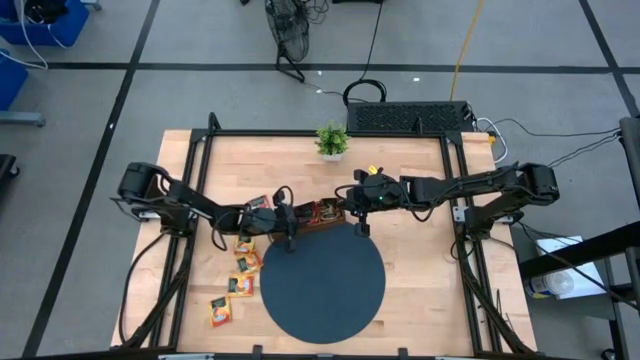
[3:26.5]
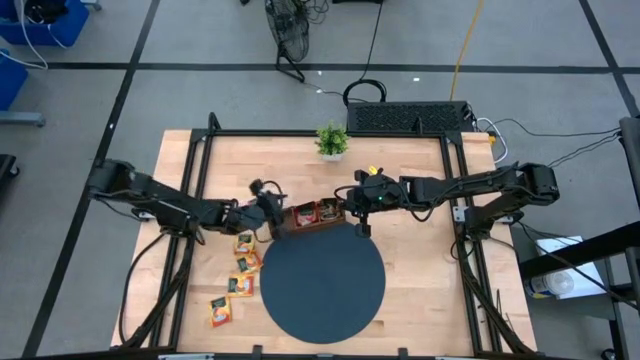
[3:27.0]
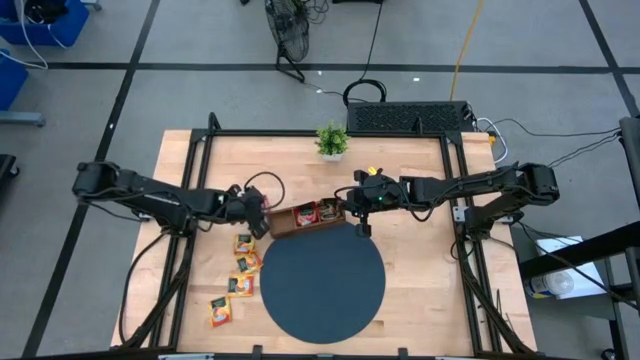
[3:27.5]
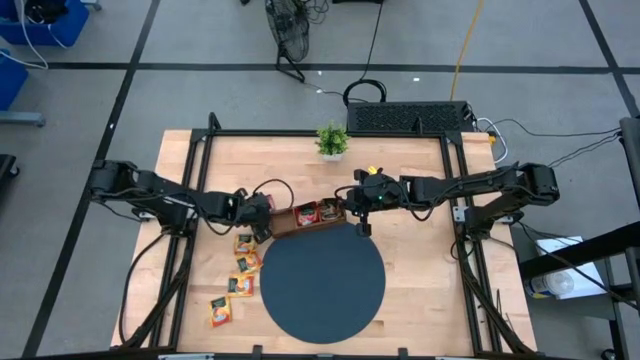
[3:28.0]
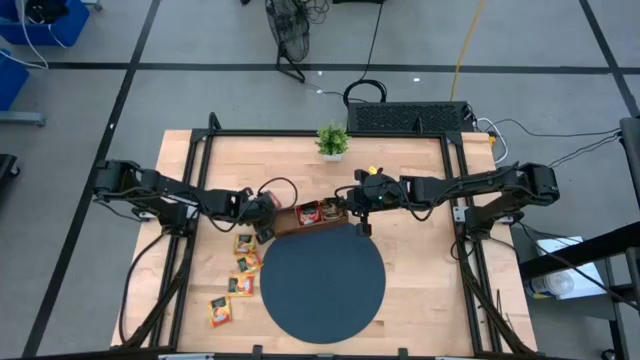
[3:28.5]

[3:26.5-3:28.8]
Task: Pick & Place Tea
Put the red tea bag into the middle slot of the wooden organizer

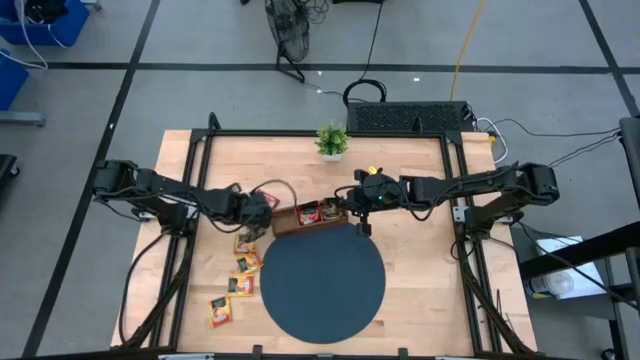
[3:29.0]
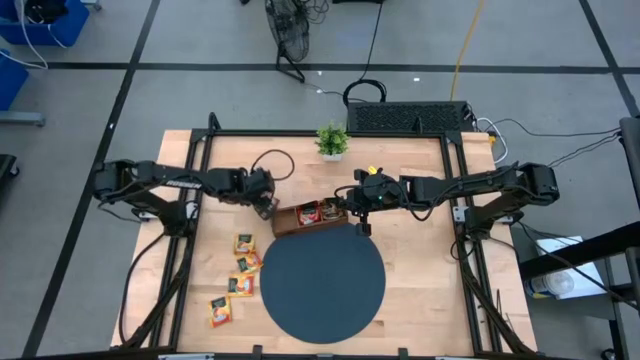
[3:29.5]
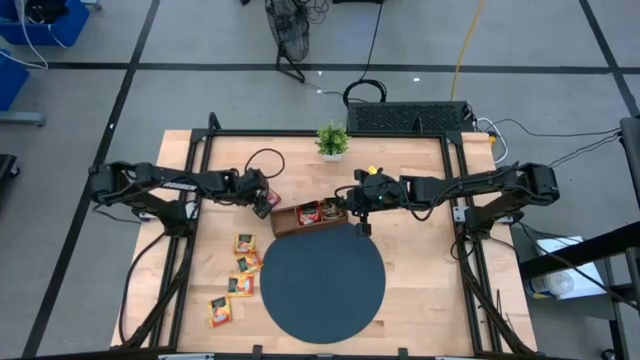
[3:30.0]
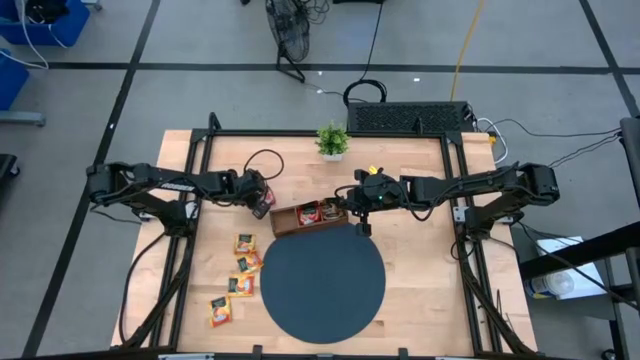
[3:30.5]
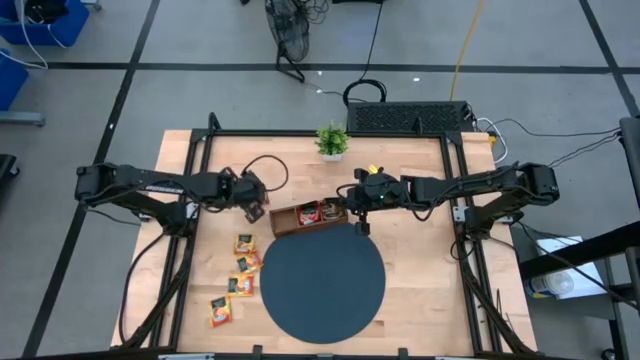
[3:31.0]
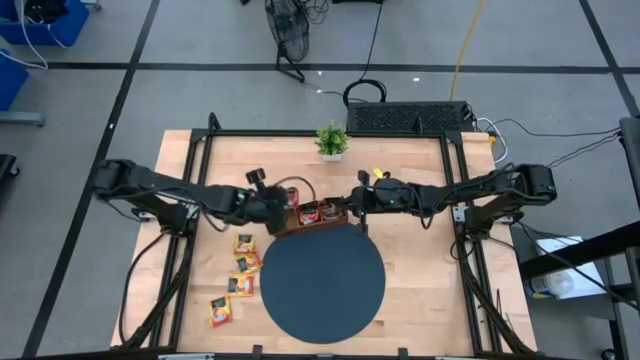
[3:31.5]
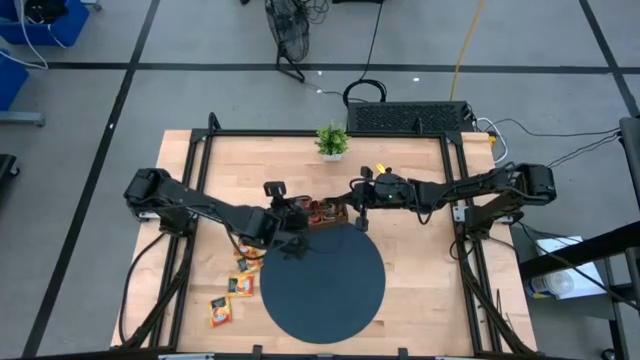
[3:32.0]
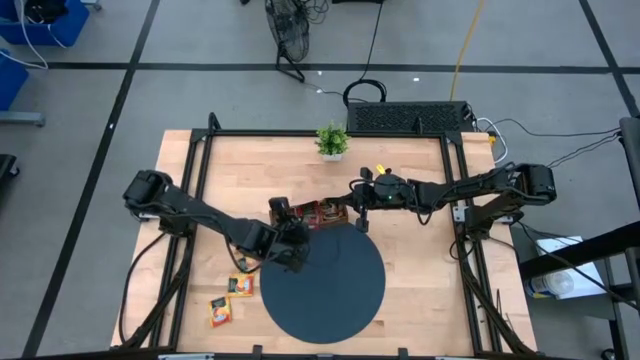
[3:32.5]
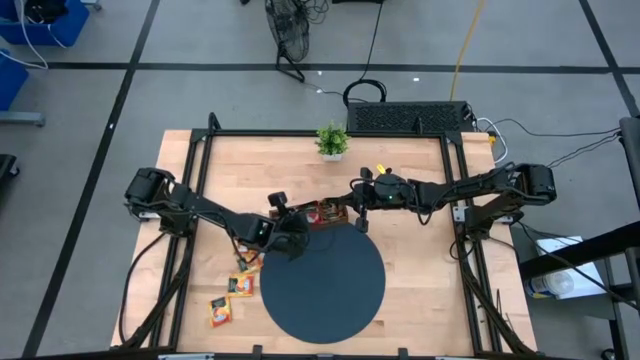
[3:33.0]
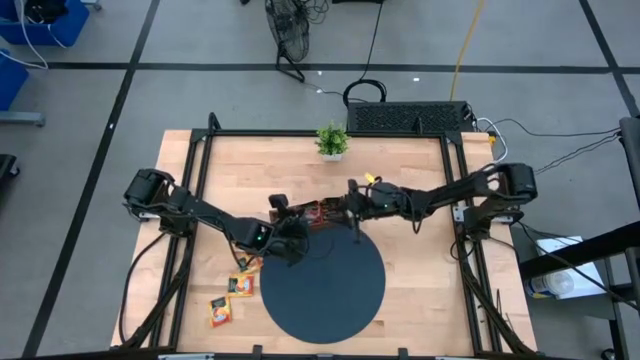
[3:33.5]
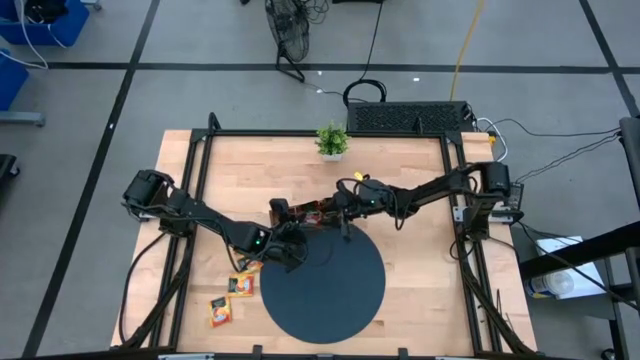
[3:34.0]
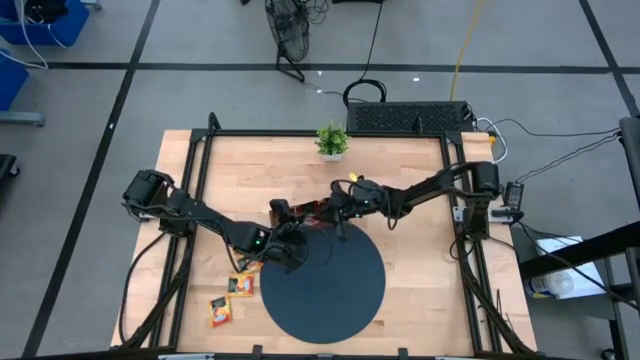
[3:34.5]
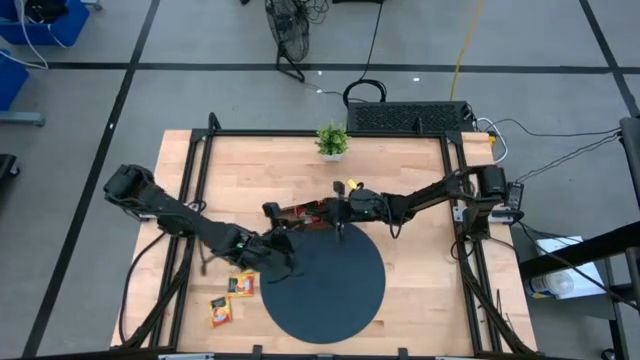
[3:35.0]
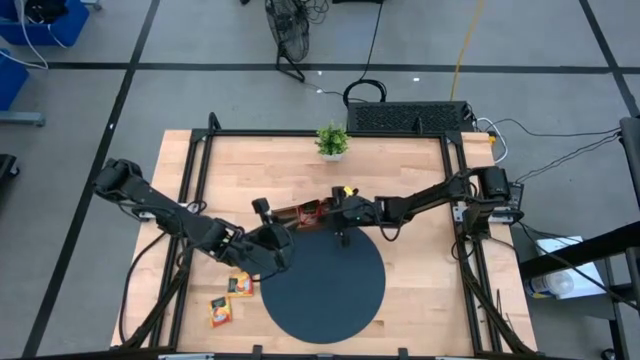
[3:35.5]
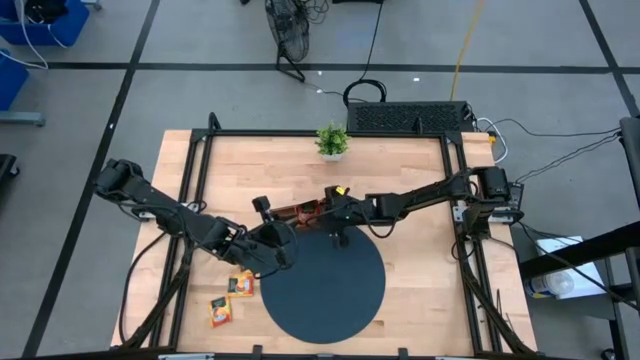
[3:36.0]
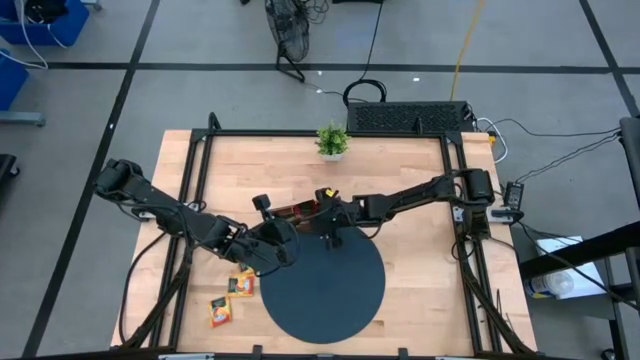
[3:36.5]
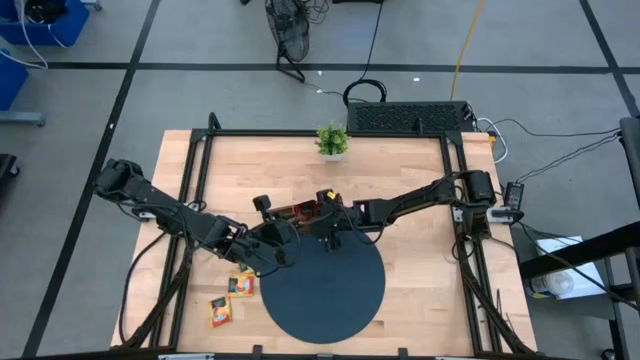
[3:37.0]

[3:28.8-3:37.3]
Put the red tea bag into the middle slot of the wooden organizer

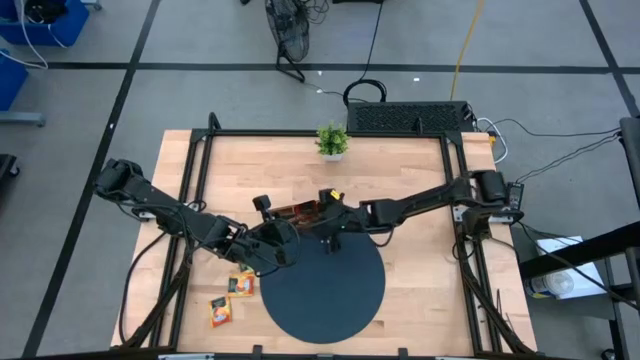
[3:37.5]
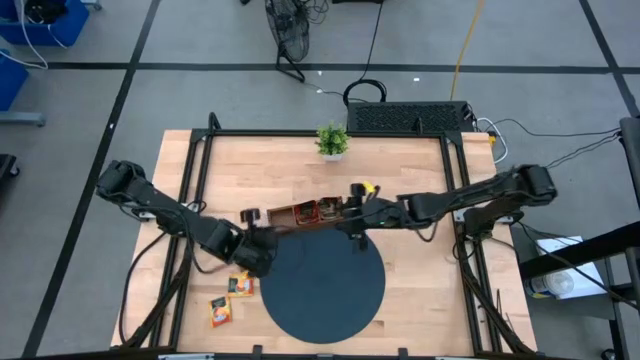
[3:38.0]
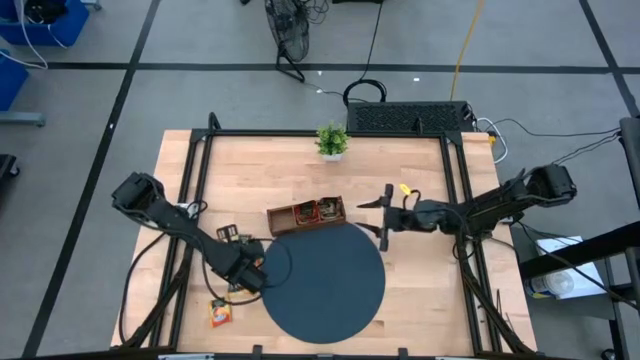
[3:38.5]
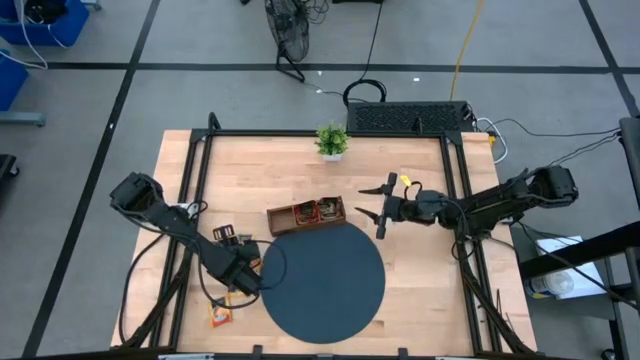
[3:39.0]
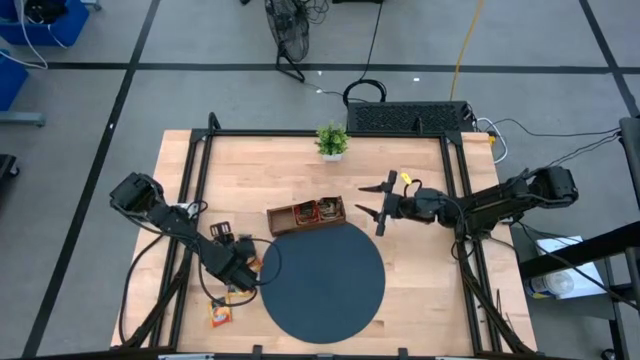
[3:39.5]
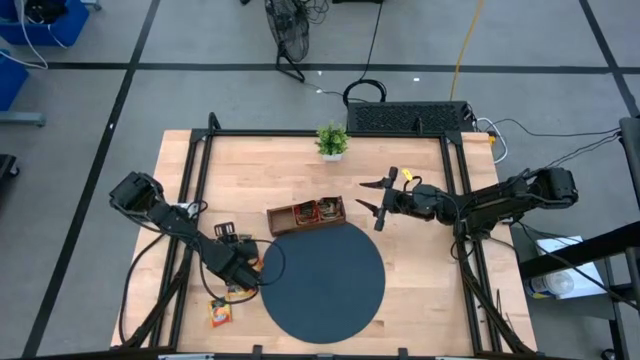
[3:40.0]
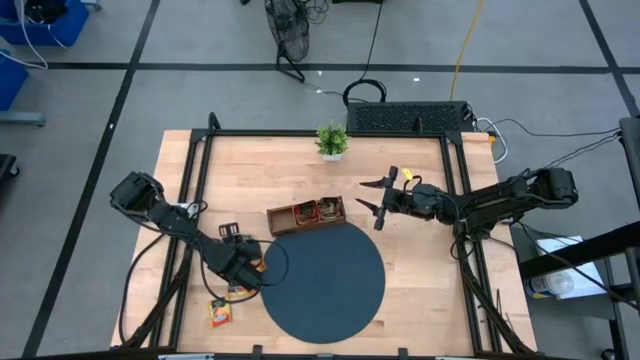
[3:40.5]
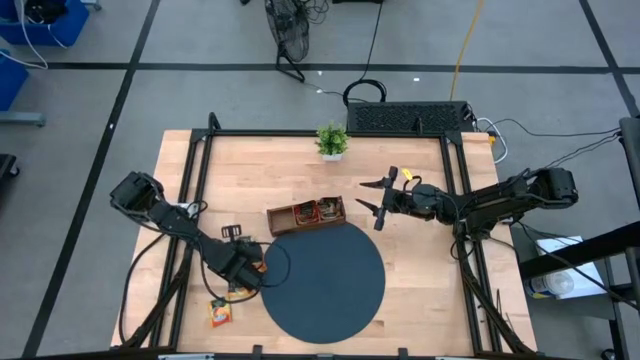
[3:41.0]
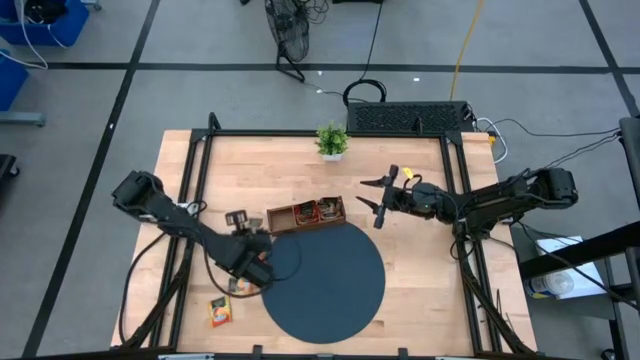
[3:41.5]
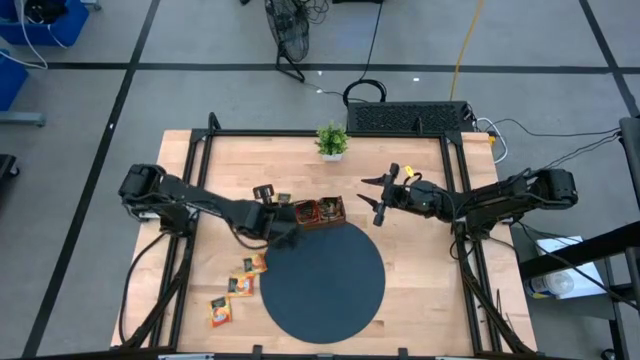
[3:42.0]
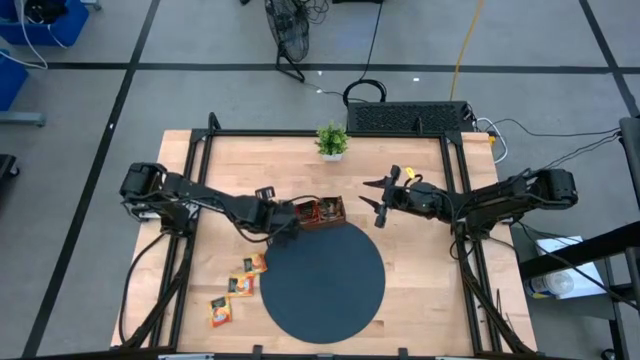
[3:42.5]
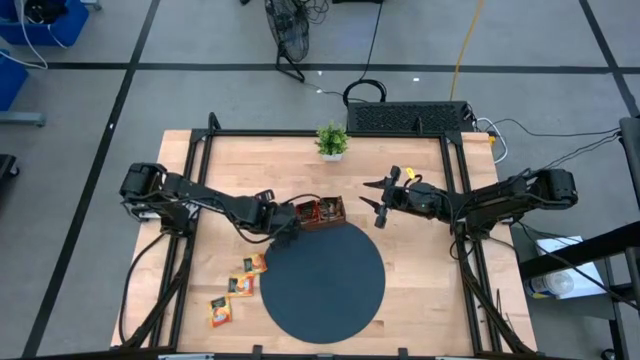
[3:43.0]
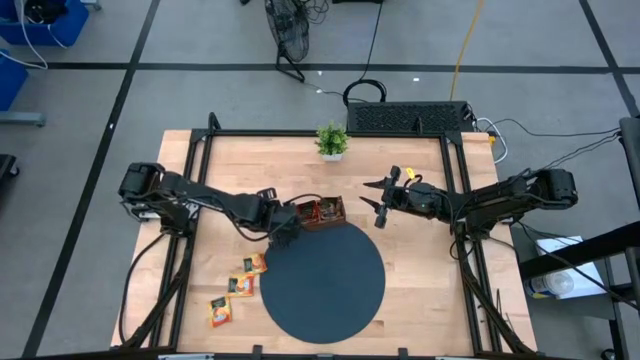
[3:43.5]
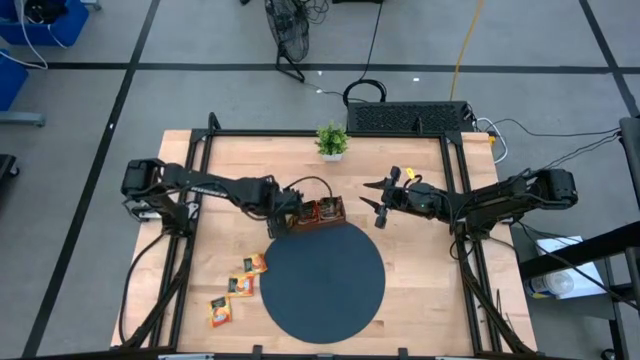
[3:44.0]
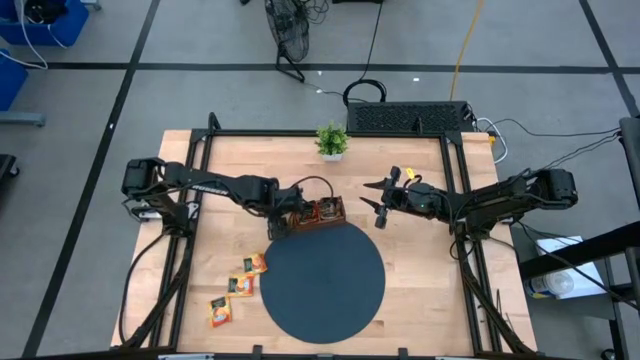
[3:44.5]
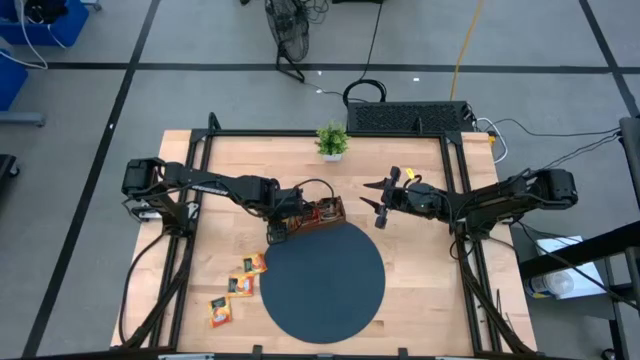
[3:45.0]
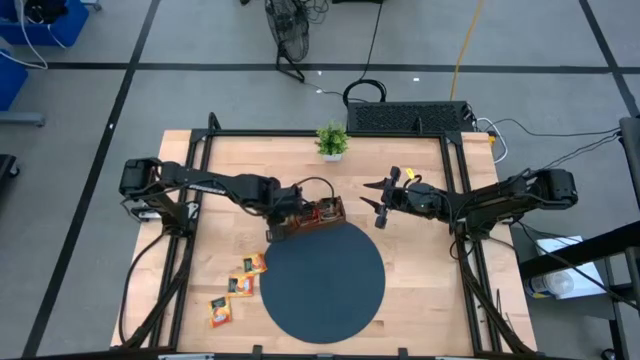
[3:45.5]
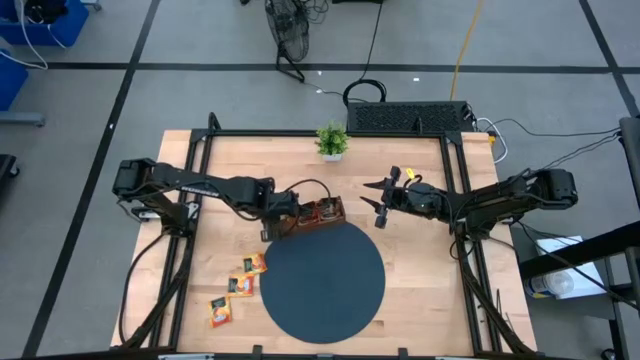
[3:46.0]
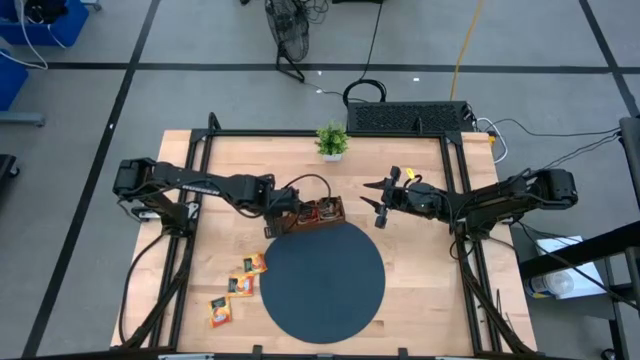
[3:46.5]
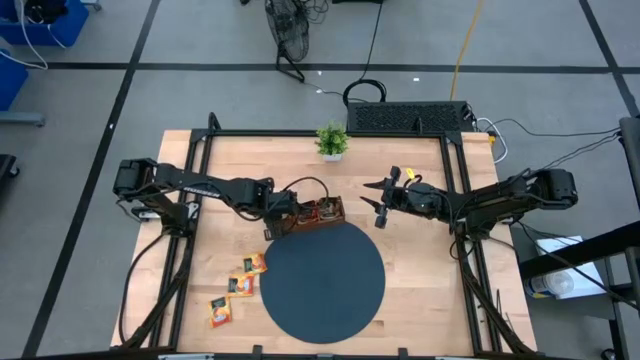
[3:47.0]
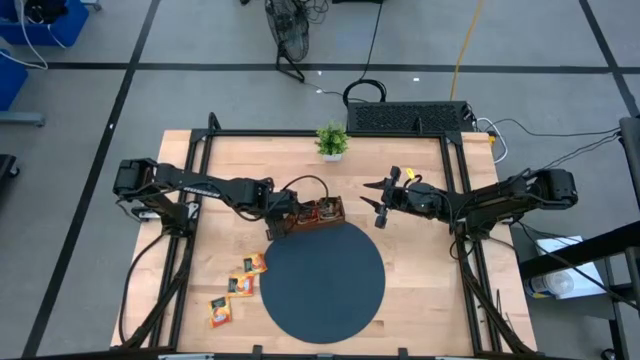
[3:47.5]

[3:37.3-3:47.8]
Put the yellow tea bag into the left slot of the wooden organizer

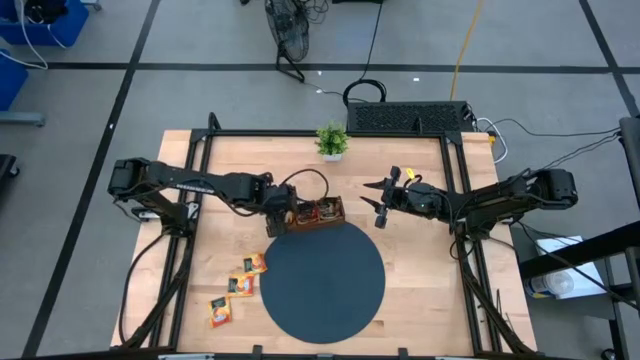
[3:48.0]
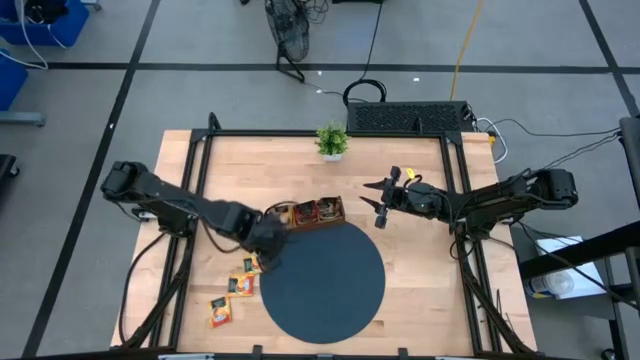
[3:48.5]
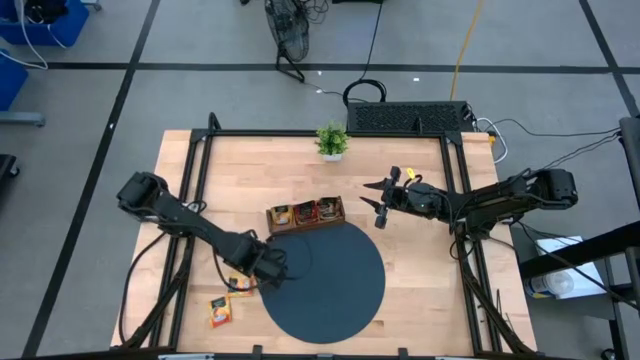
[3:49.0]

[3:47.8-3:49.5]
Put the top yellow tea bag into the left slot of the wooden organizer
